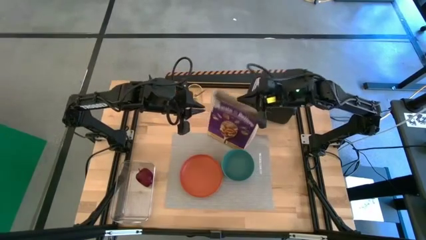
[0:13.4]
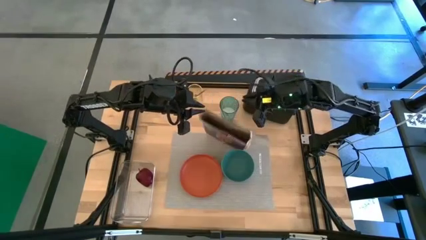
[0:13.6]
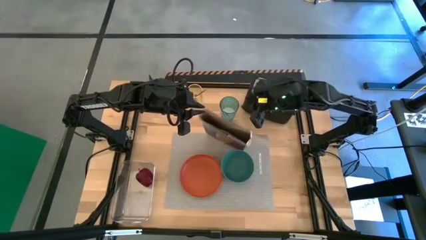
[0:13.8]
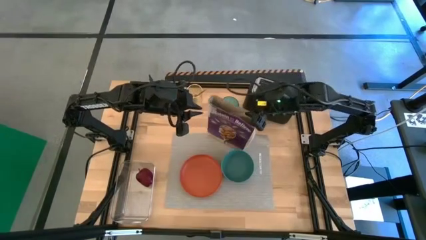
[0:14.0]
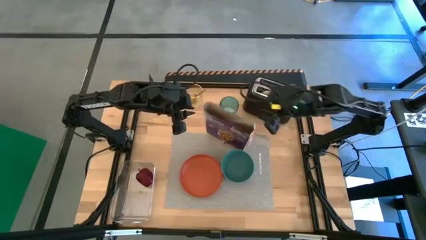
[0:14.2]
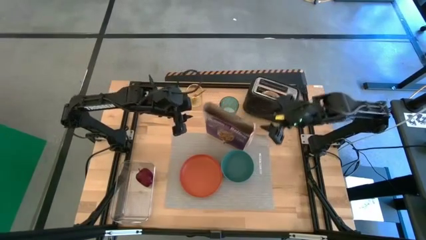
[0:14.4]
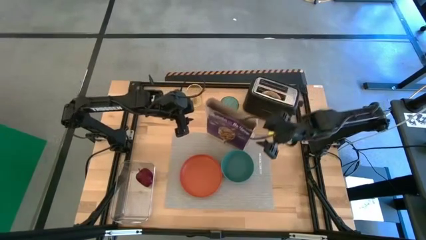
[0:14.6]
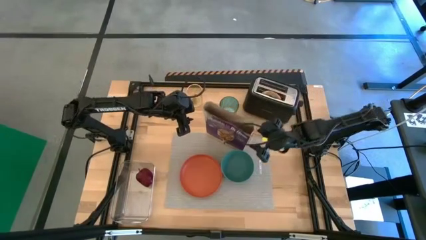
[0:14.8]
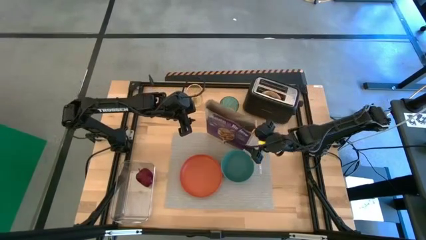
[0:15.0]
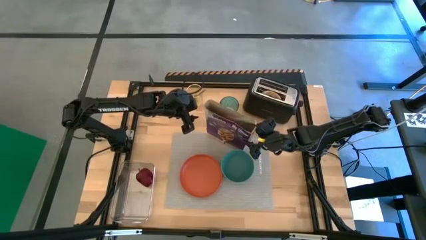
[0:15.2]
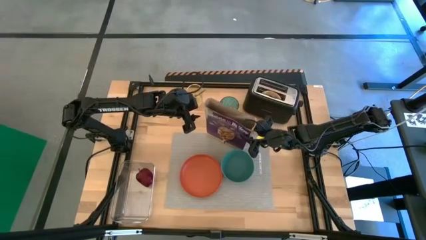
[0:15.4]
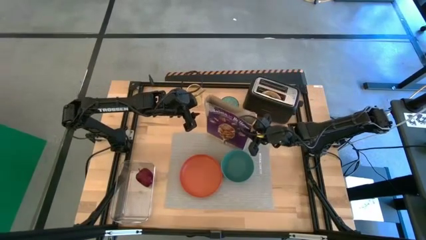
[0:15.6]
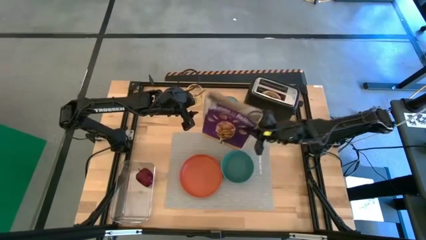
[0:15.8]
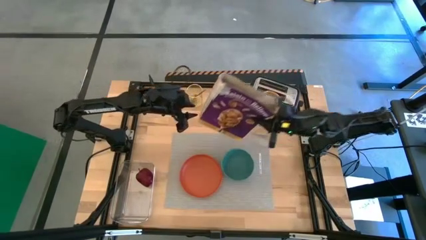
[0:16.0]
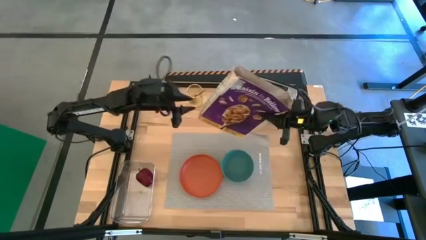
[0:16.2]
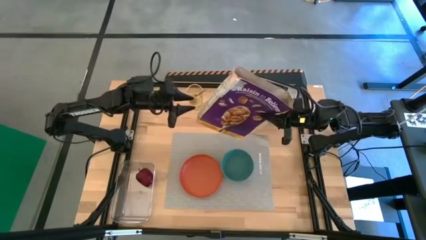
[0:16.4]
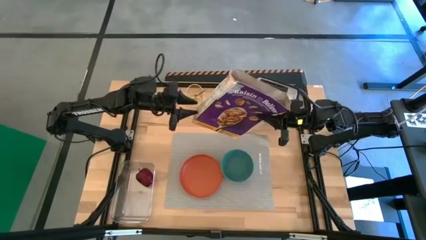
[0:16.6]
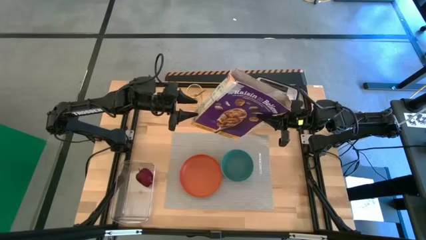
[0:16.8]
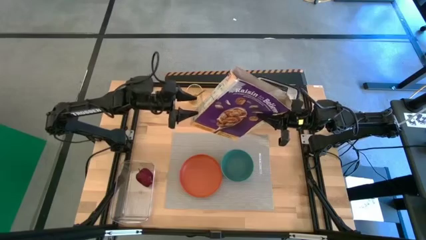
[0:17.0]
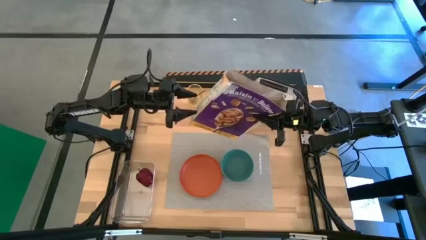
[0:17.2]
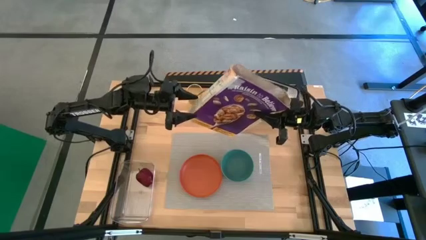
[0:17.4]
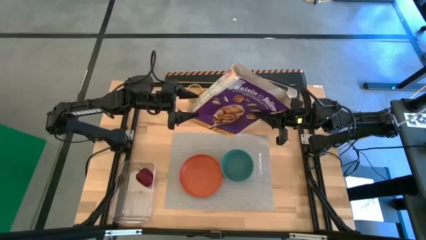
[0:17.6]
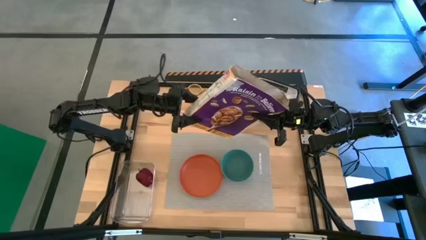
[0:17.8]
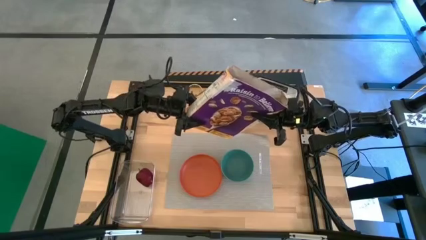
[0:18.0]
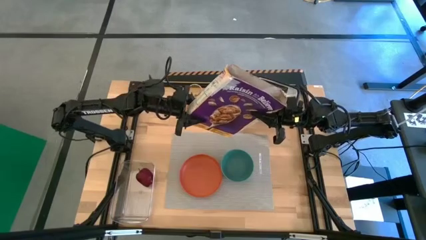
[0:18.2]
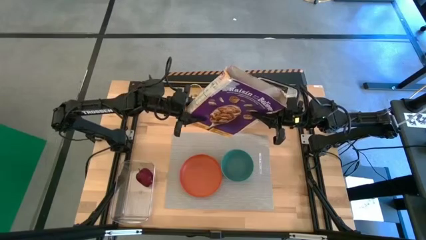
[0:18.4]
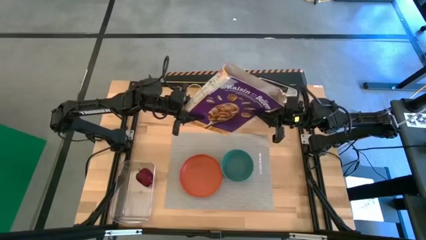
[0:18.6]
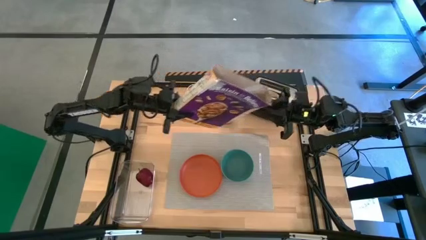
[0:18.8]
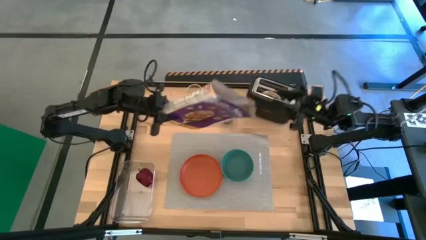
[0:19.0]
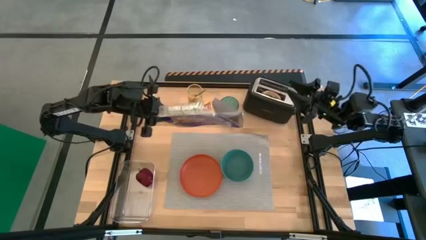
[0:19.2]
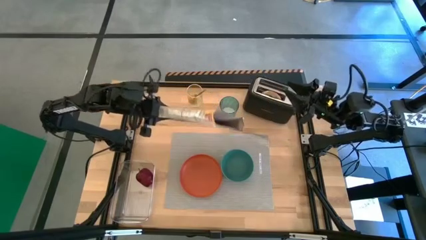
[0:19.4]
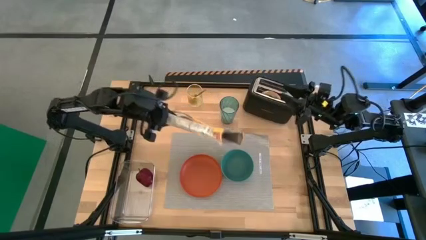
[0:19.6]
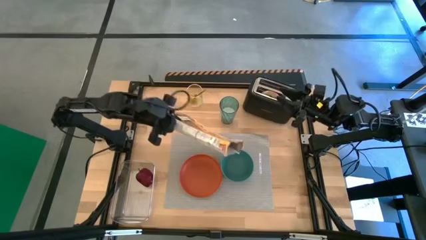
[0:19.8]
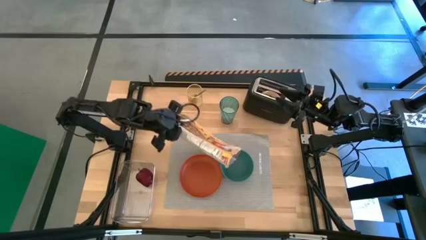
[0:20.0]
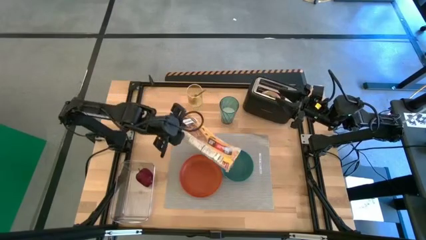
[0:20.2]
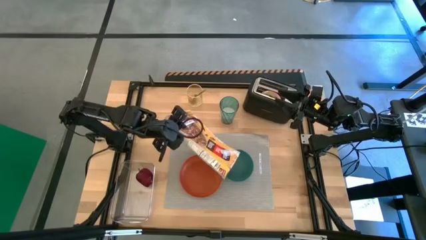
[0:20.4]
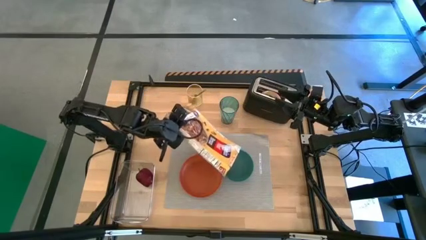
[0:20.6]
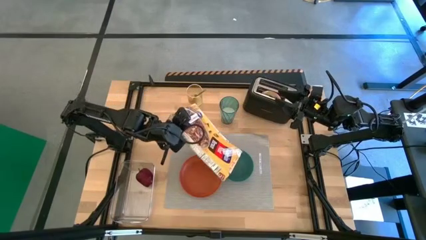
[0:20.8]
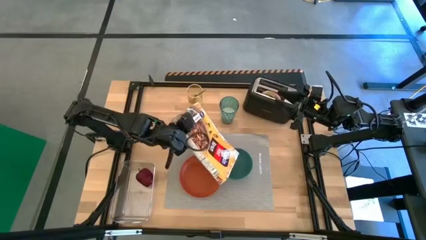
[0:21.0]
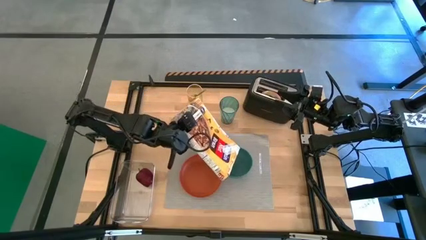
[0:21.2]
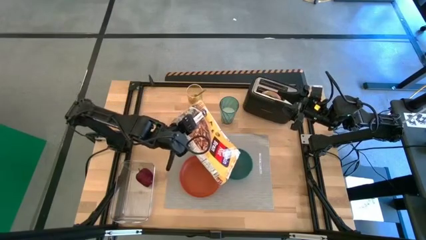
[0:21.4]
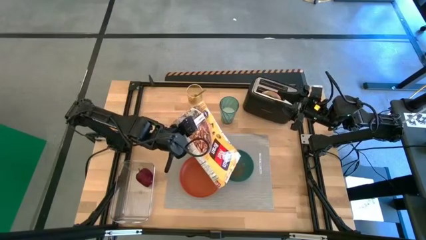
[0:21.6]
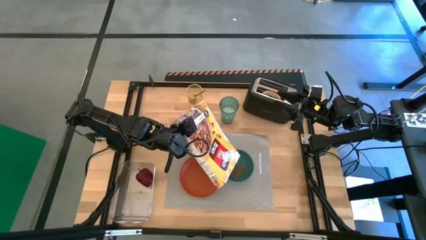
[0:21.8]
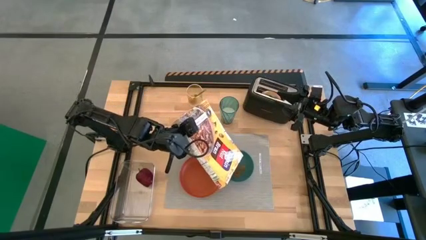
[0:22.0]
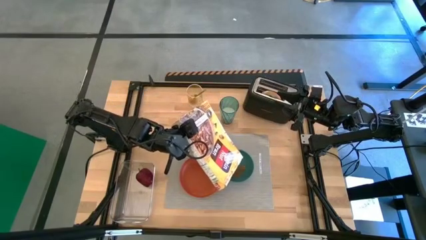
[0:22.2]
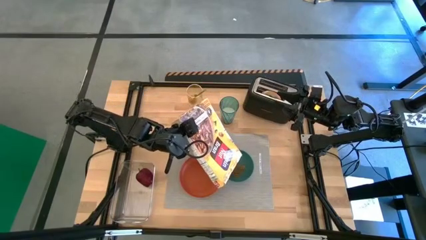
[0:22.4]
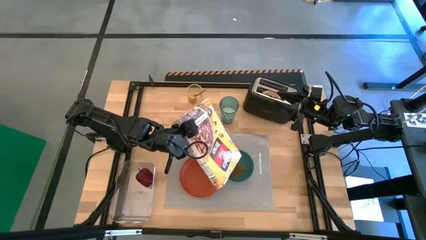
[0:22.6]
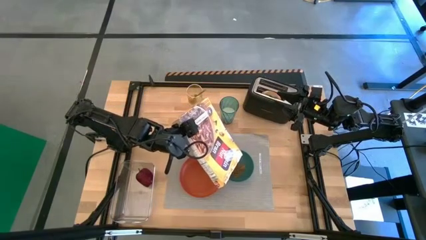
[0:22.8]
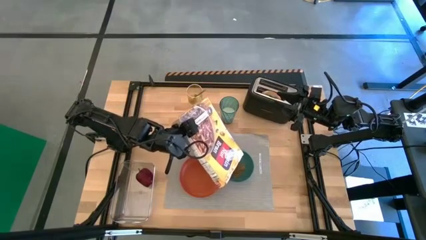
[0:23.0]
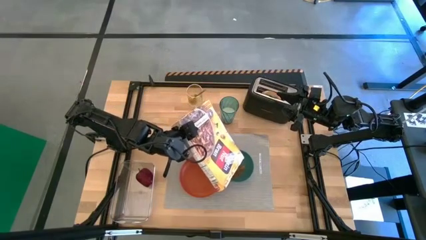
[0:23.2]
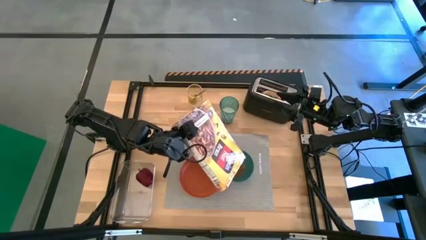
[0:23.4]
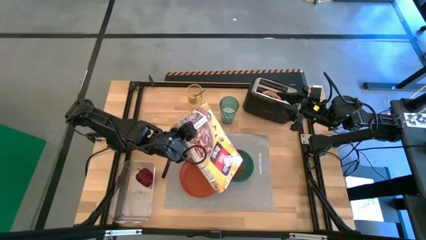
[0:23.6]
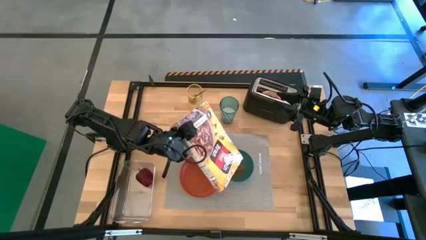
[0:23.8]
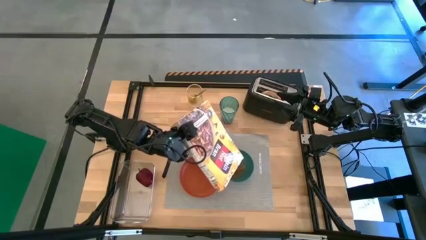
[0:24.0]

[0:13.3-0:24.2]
Task: Arrange a breakfast setting
Pour the cereal into the blue bowl from the cereal box
